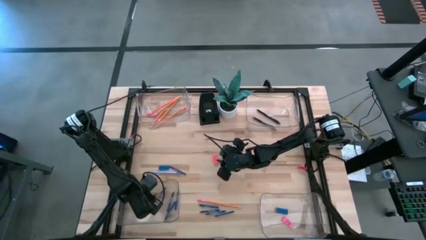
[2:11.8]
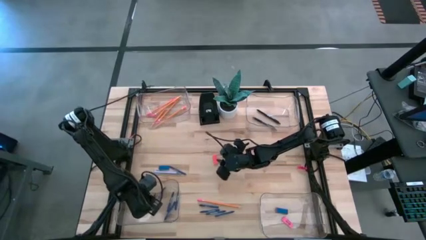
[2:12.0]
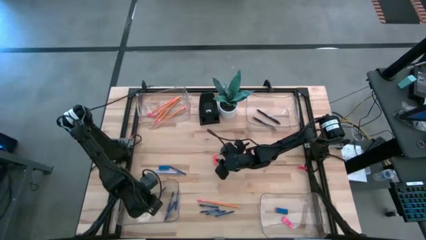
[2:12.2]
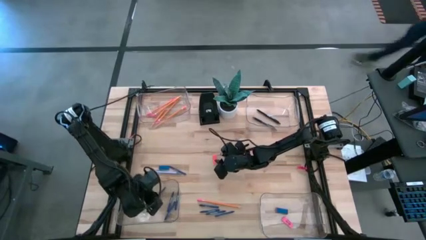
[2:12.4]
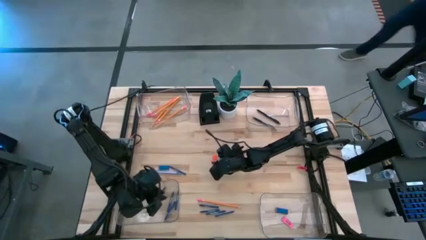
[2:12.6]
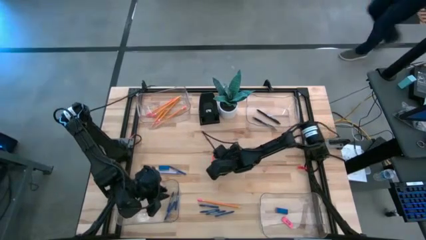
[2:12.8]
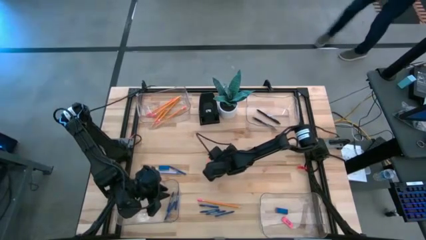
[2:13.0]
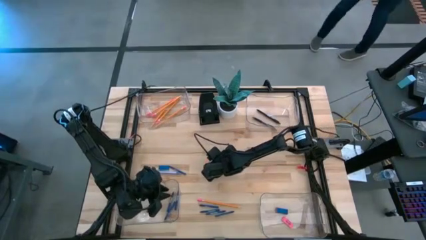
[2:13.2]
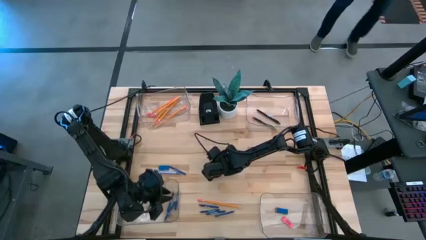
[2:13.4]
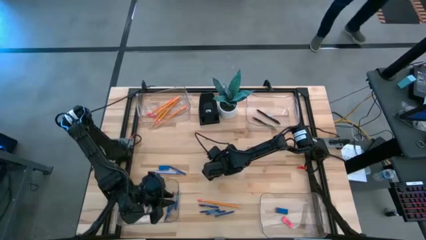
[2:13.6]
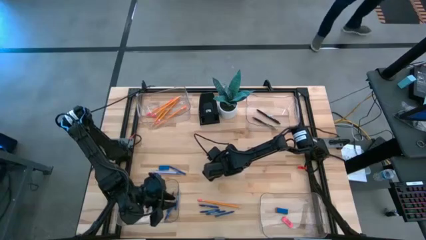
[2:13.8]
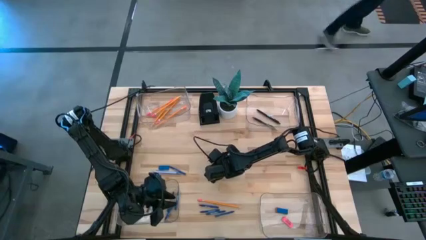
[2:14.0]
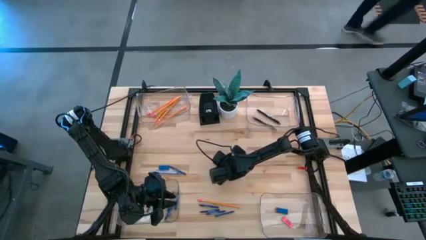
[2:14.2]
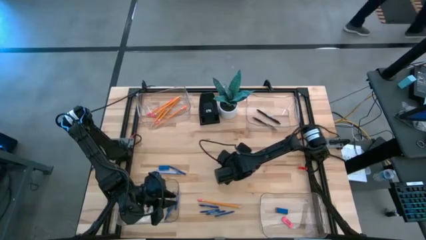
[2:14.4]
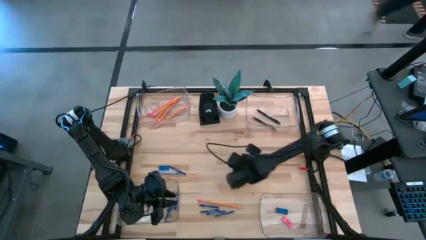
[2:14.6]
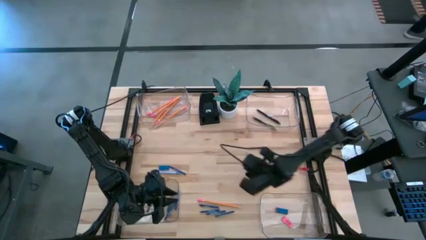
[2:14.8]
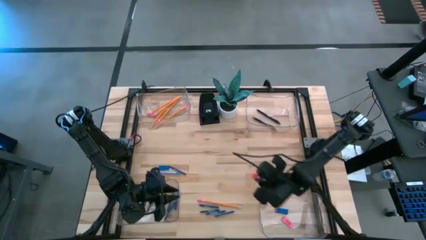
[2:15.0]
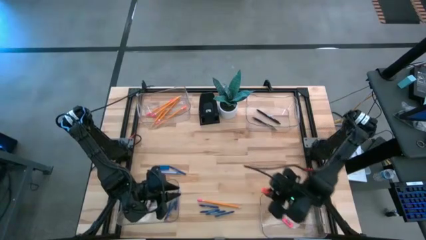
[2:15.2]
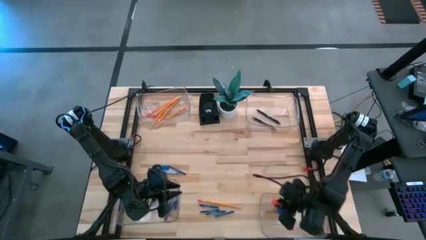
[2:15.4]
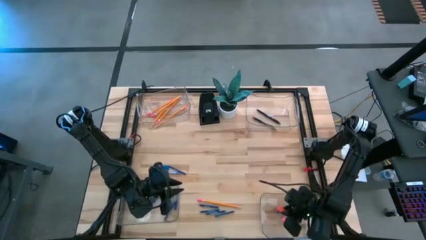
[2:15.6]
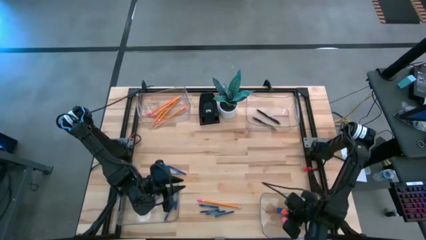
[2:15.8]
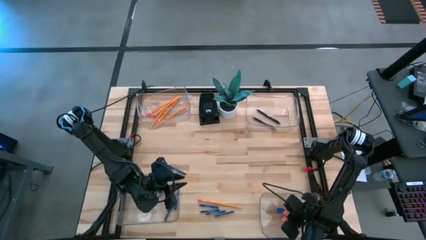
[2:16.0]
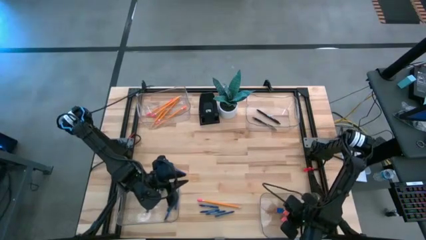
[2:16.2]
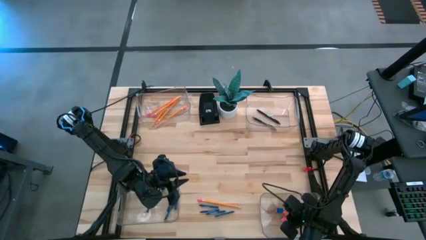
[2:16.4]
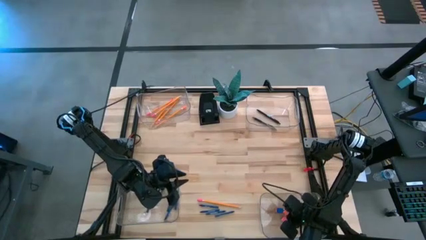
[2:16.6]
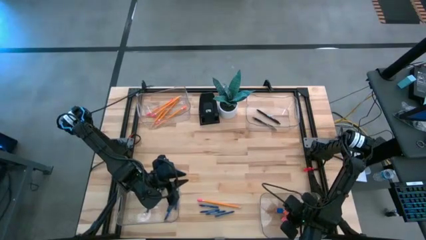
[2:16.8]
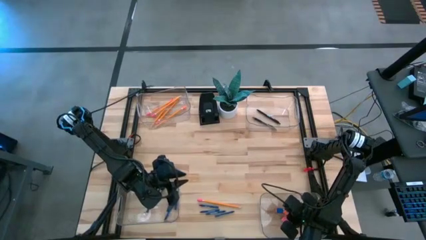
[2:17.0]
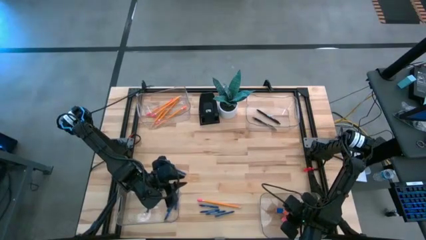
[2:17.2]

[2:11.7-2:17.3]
Task: Sort crayons/erasers/pens/pencils in bins
Put the orange eraser into the bottom right transparent bin

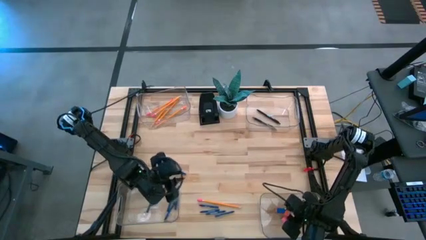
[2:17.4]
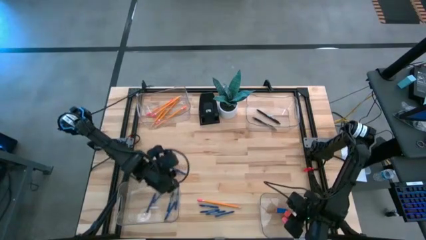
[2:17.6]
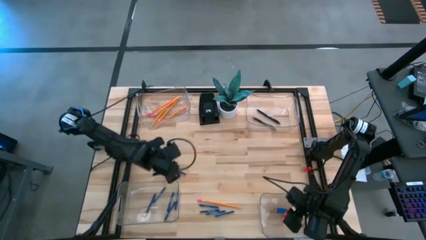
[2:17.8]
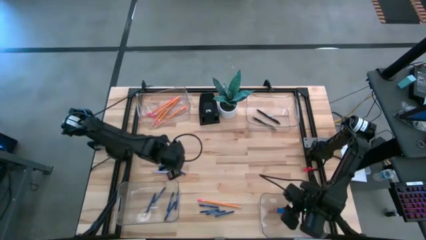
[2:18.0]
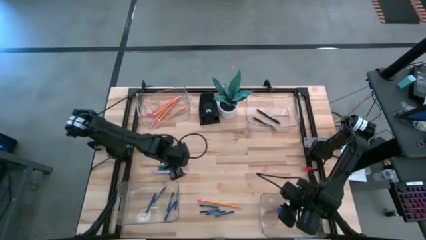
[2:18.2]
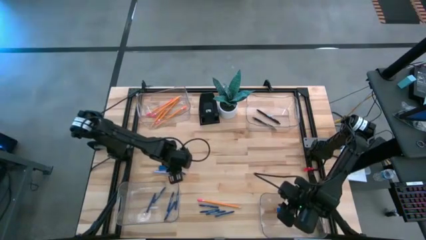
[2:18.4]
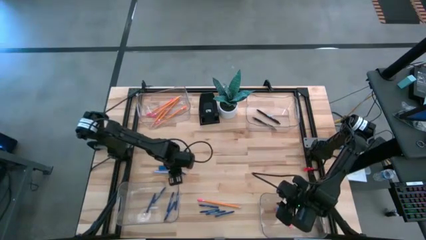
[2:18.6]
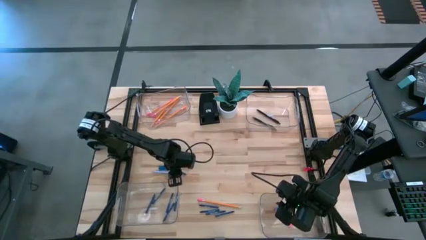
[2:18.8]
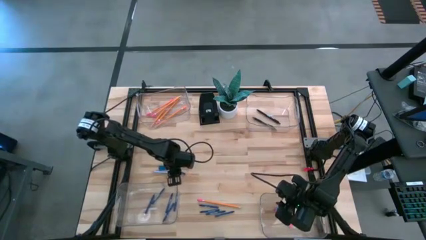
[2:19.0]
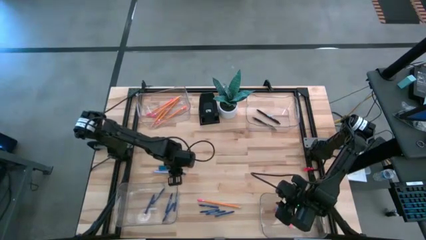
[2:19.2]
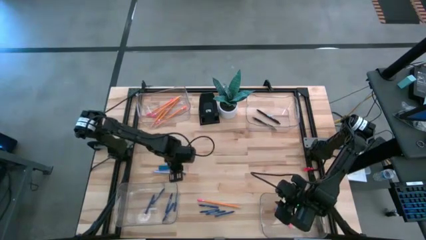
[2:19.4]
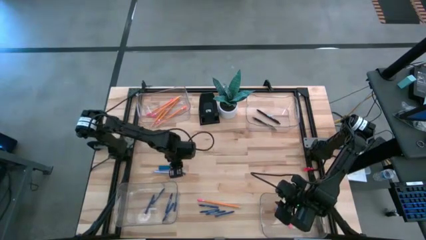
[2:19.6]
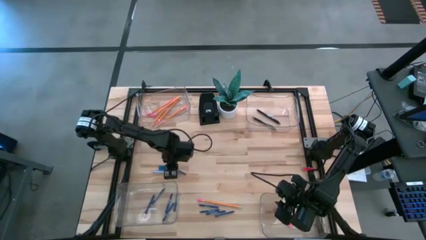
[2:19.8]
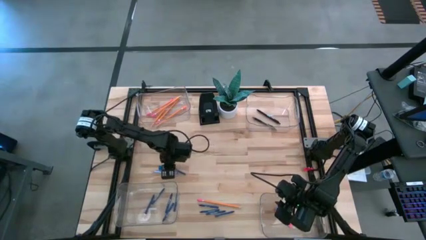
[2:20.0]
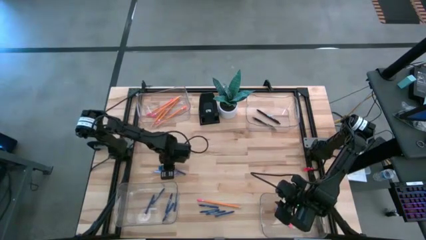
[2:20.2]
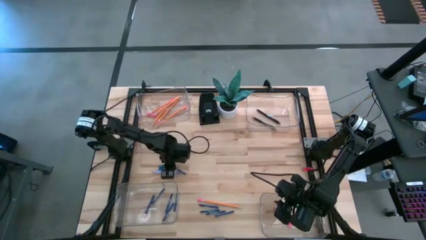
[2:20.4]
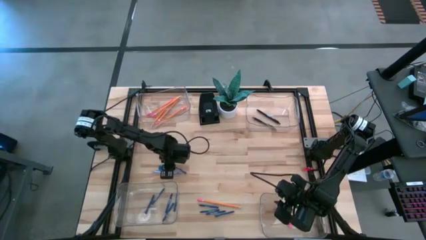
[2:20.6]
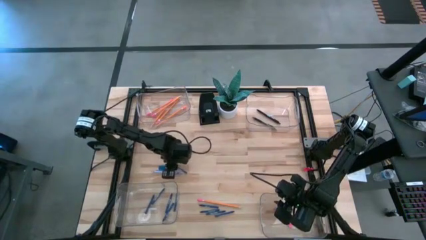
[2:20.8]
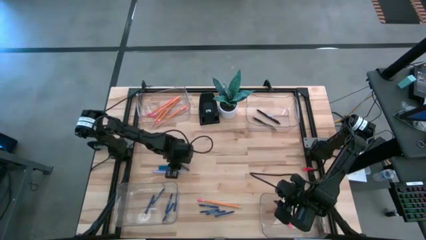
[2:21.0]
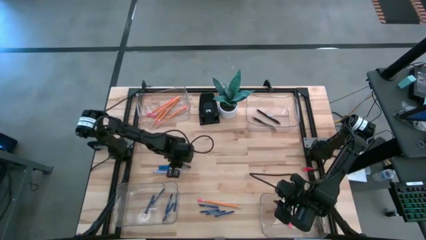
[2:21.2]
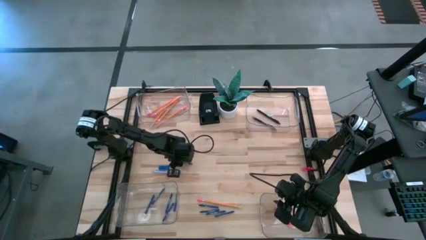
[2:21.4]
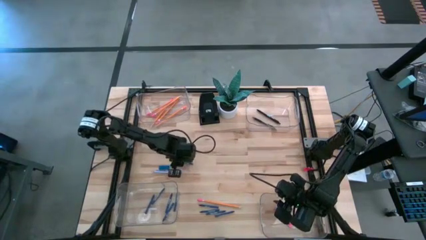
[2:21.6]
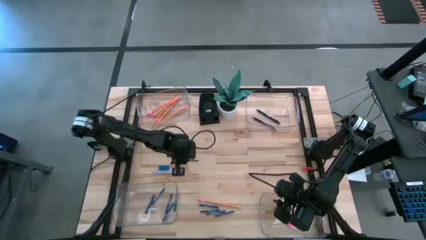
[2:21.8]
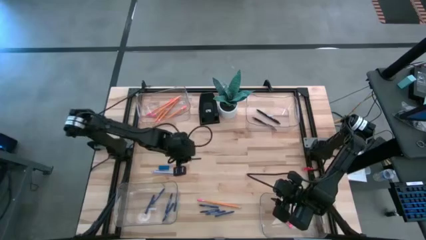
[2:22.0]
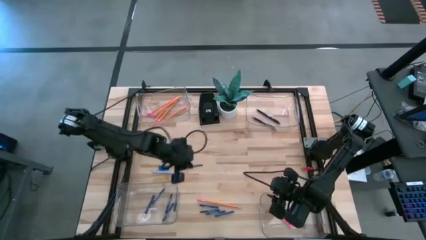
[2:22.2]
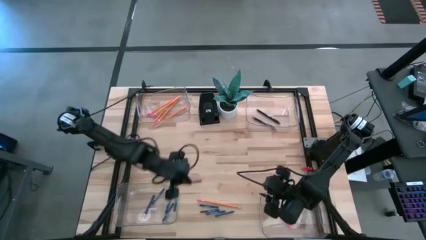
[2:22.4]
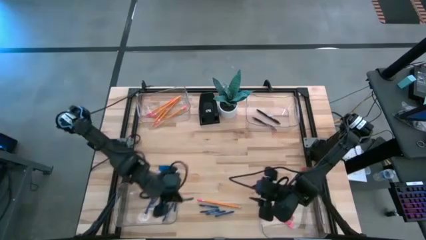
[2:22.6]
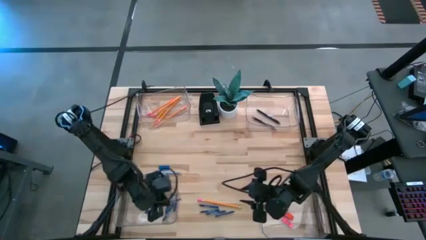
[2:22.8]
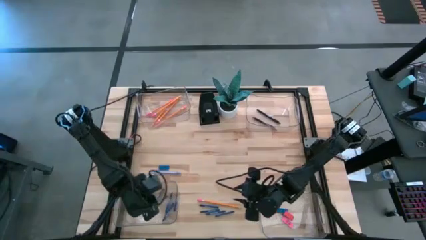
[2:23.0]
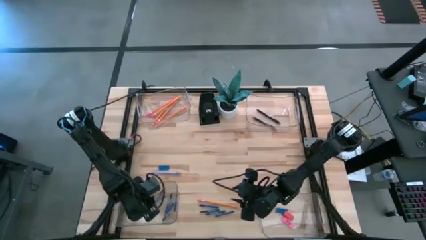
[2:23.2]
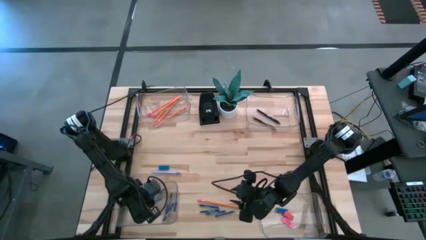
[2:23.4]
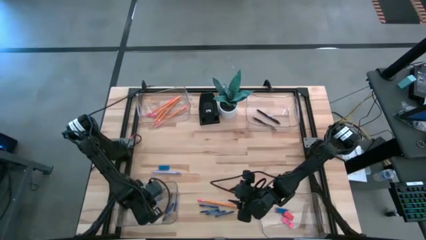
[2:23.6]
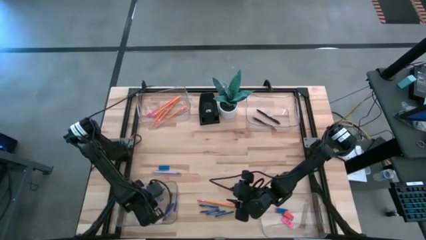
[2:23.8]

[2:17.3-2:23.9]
Put the blue crayon into the bottom left transparent bin

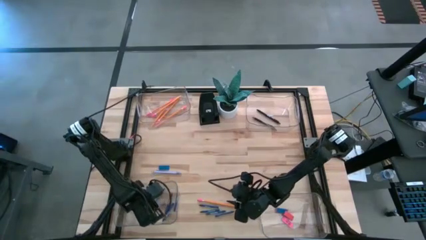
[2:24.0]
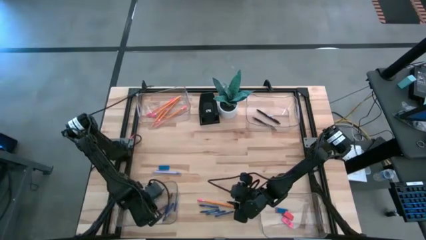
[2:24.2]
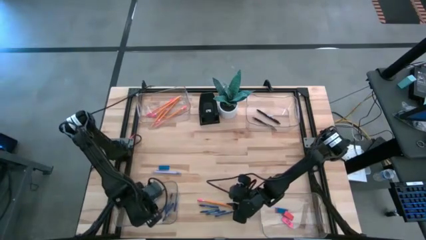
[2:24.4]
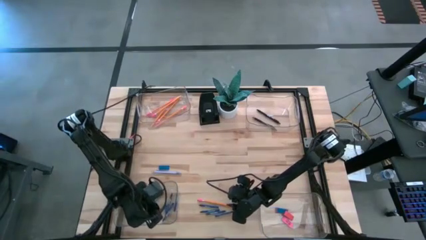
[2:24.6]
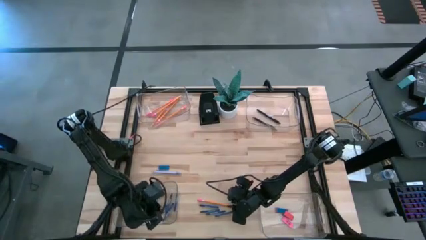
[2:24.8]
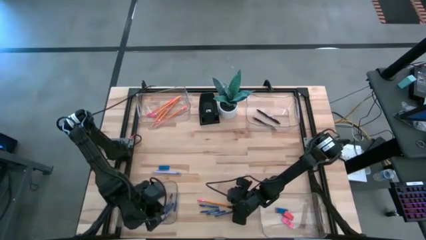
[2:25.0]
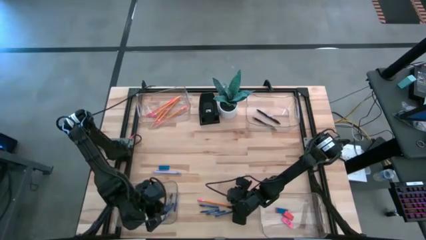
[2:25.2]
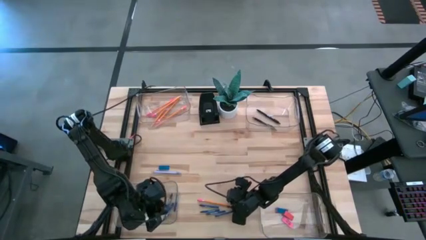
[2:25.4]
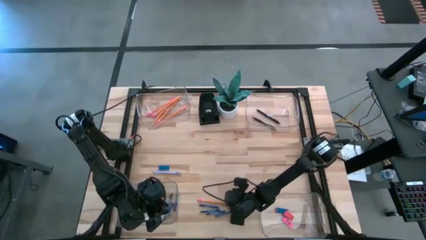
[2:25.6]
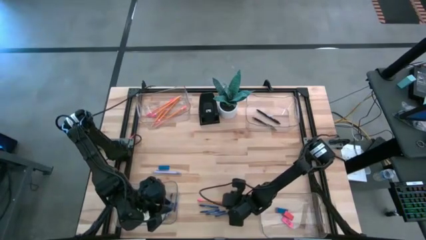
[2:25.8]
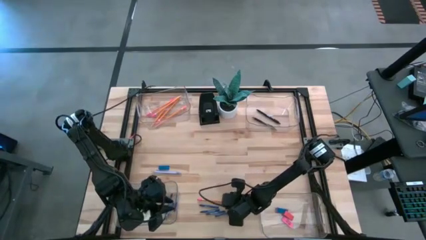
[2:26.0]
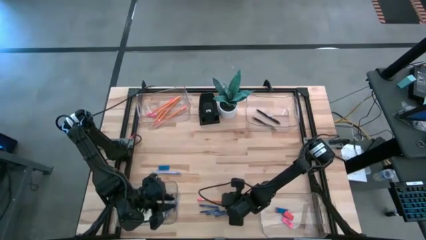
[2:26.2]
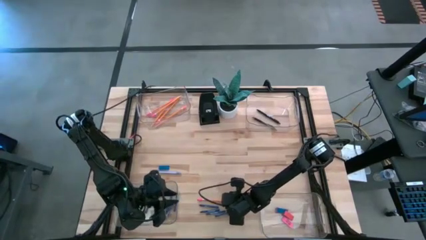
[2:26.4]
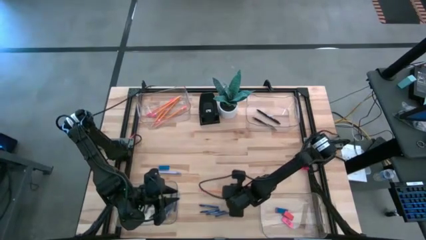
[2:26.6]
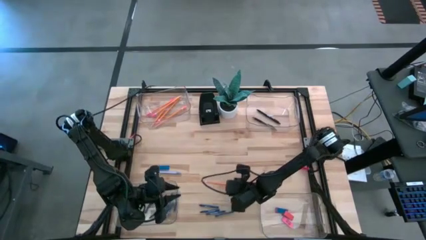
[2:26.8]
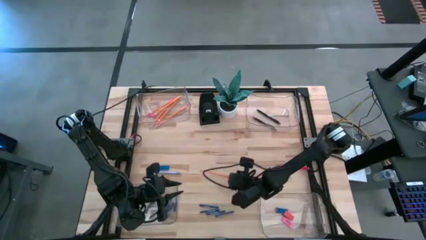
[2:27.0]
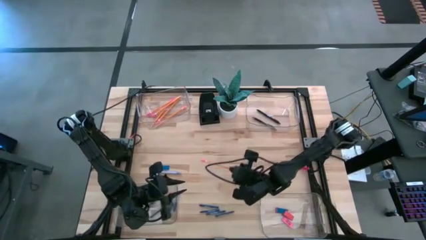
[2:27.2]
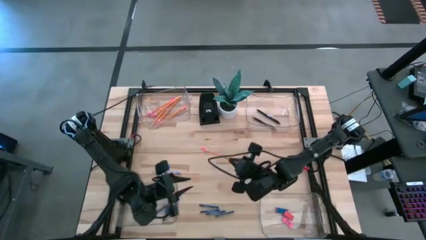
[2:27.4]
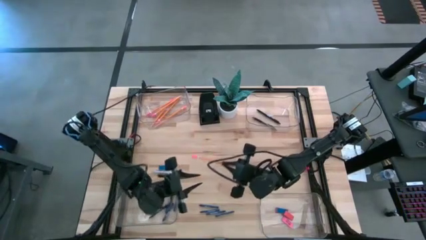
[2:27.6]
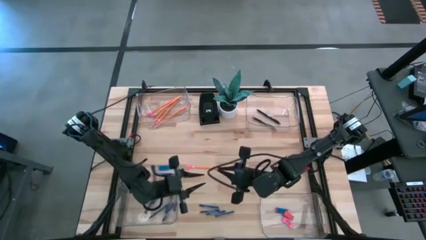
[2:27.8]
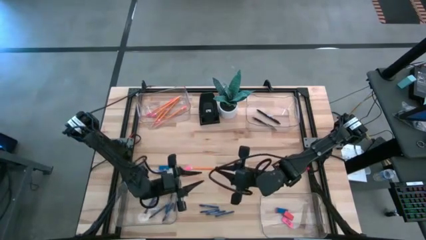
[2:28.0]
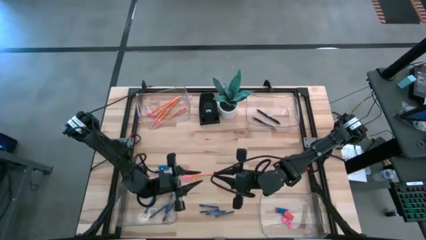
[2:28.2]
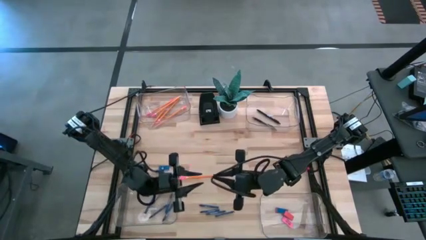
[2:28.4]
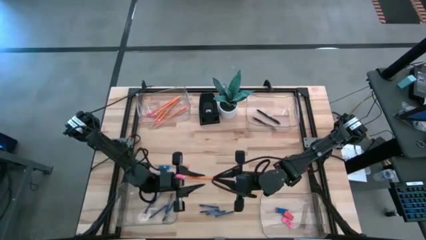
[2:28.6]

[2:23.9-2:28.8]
Put the orange pencil into the top left transparent bin
